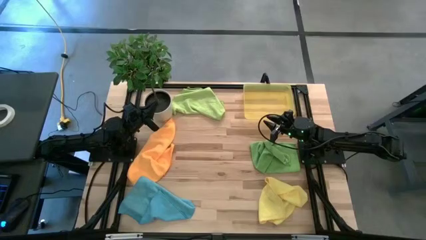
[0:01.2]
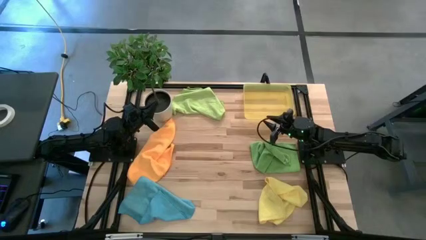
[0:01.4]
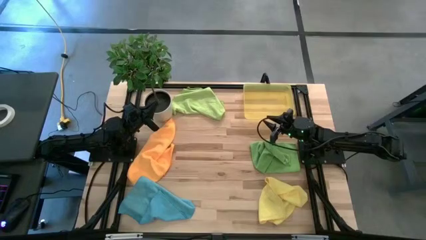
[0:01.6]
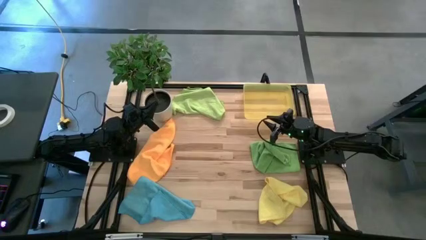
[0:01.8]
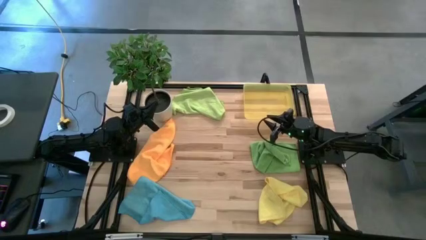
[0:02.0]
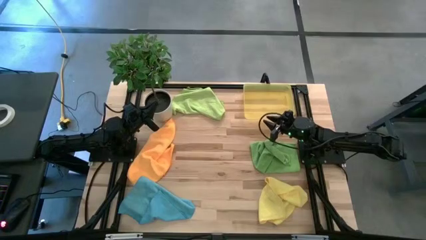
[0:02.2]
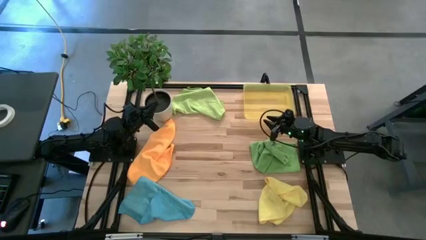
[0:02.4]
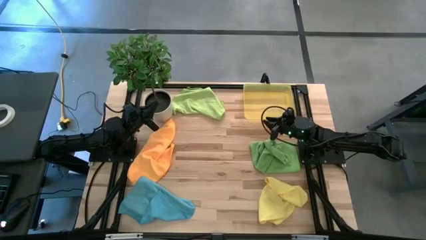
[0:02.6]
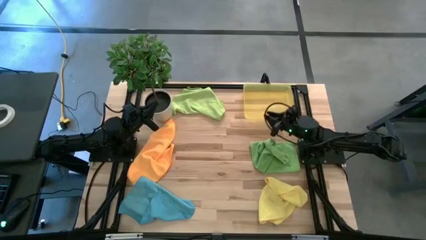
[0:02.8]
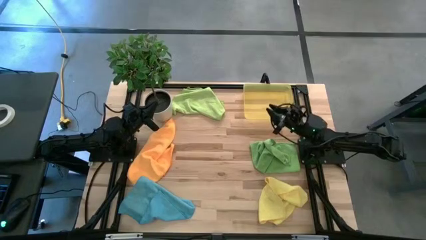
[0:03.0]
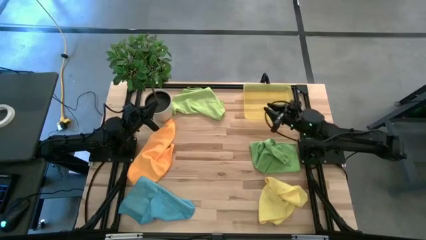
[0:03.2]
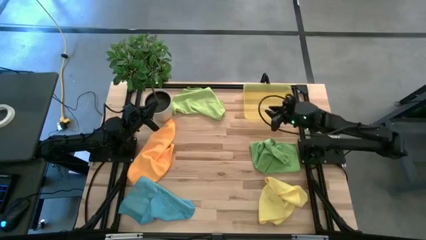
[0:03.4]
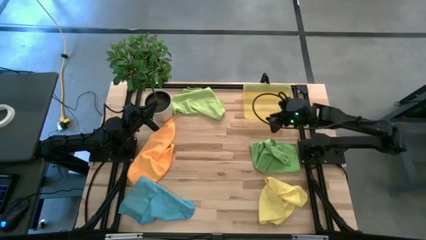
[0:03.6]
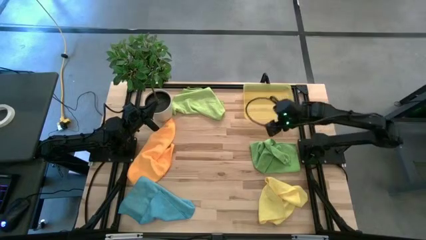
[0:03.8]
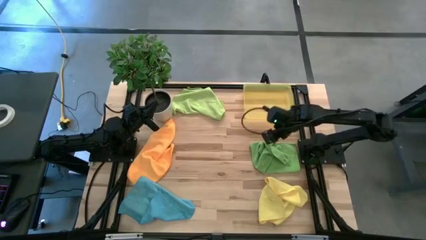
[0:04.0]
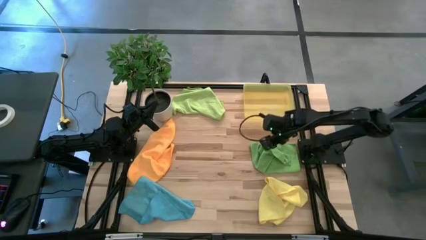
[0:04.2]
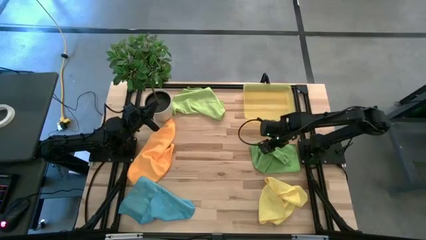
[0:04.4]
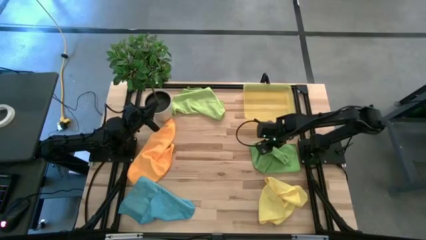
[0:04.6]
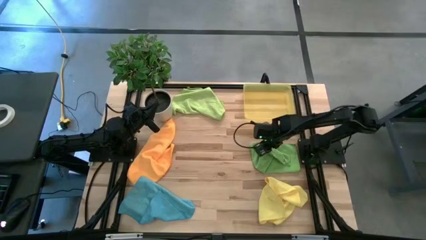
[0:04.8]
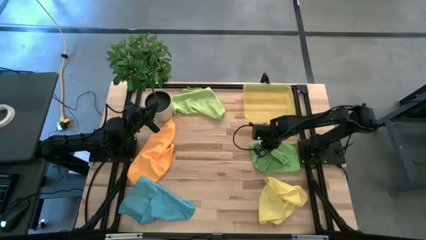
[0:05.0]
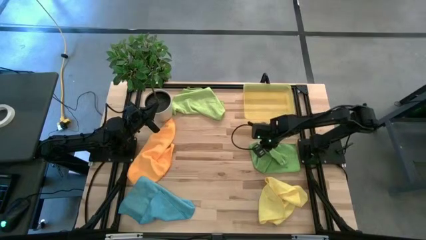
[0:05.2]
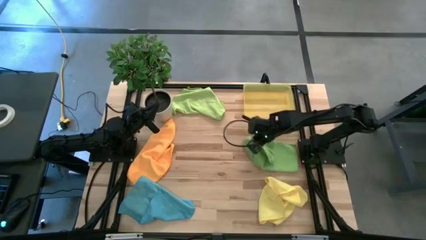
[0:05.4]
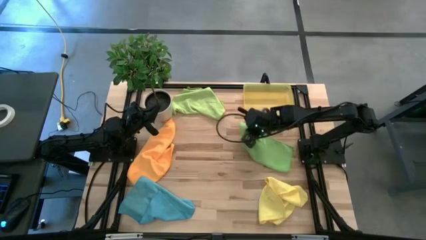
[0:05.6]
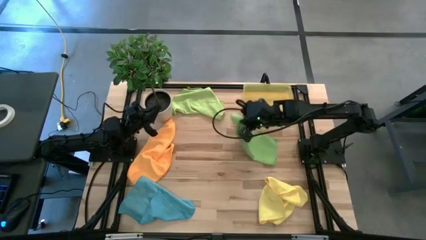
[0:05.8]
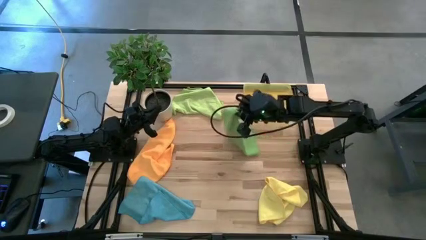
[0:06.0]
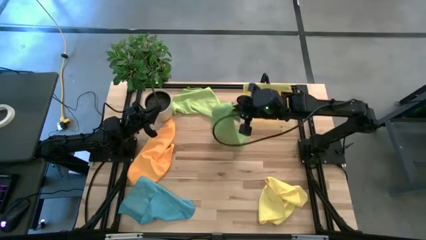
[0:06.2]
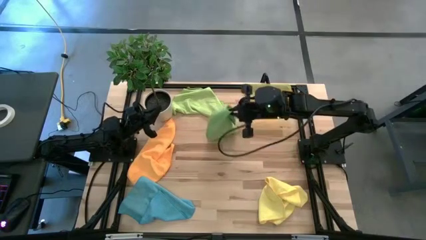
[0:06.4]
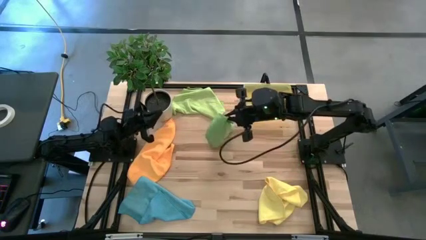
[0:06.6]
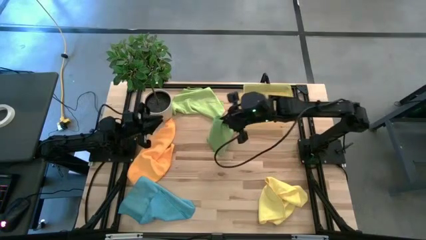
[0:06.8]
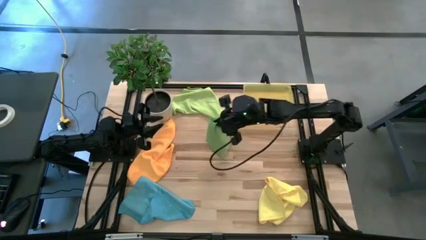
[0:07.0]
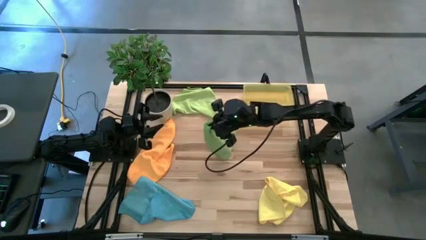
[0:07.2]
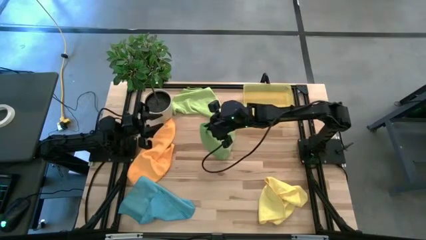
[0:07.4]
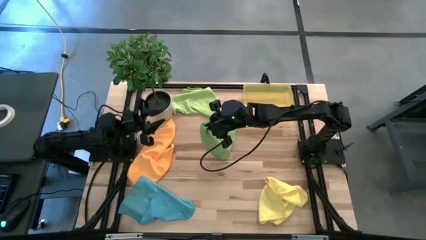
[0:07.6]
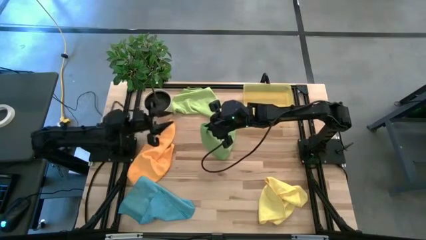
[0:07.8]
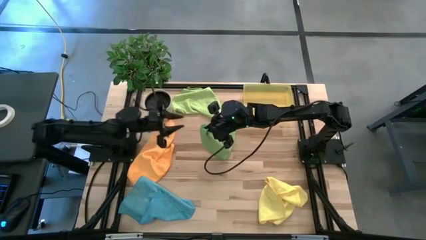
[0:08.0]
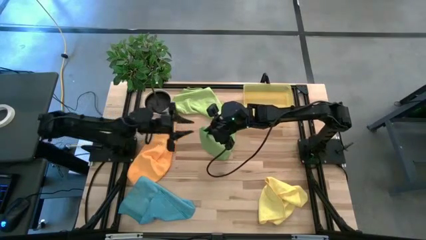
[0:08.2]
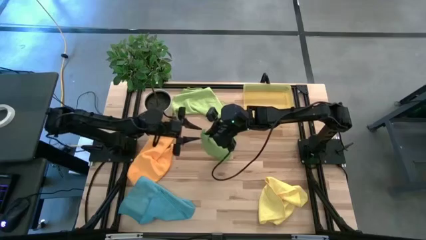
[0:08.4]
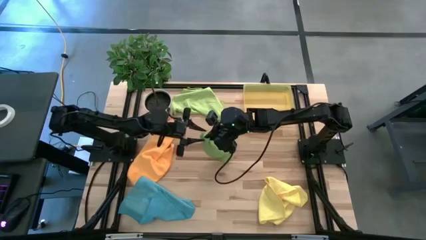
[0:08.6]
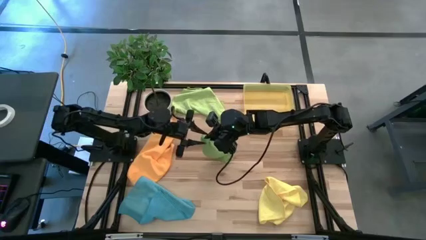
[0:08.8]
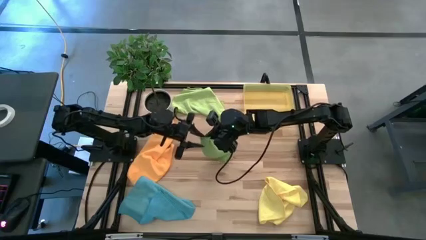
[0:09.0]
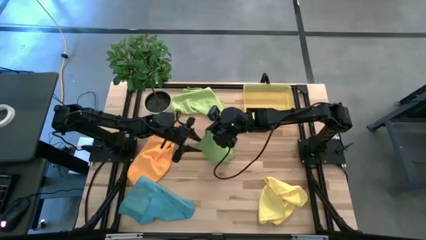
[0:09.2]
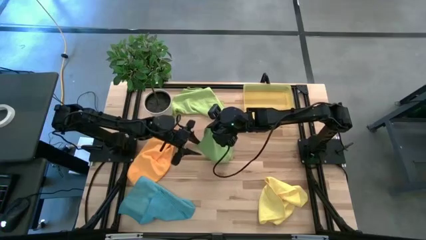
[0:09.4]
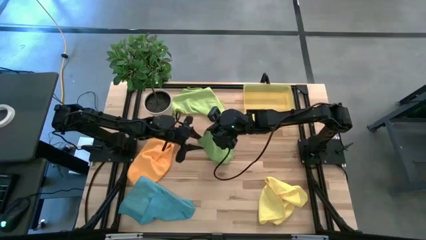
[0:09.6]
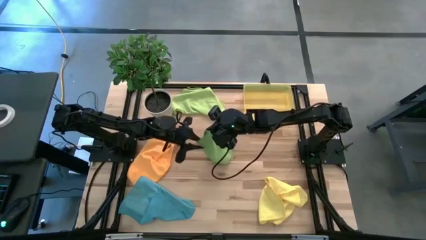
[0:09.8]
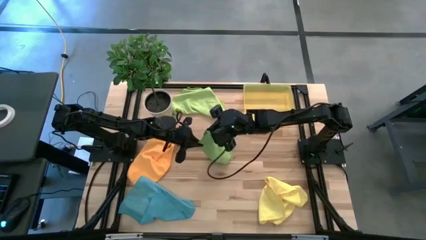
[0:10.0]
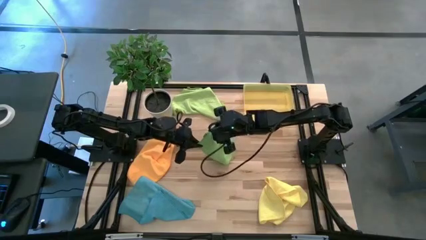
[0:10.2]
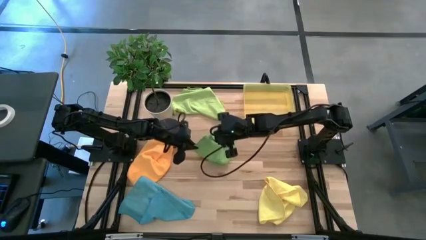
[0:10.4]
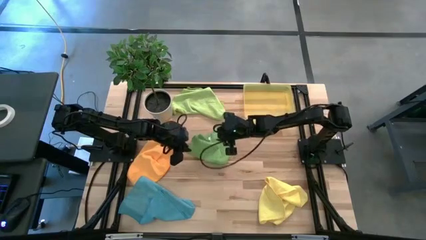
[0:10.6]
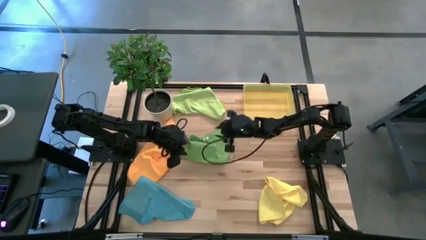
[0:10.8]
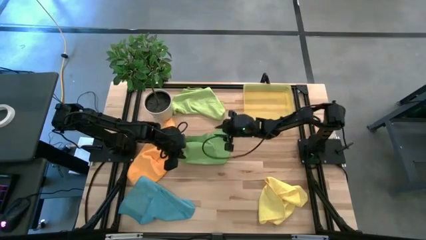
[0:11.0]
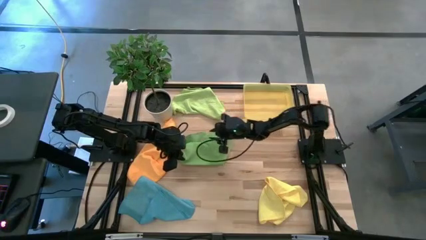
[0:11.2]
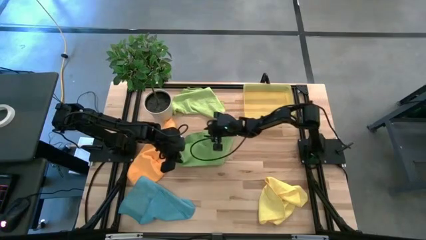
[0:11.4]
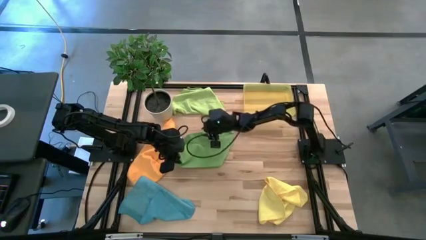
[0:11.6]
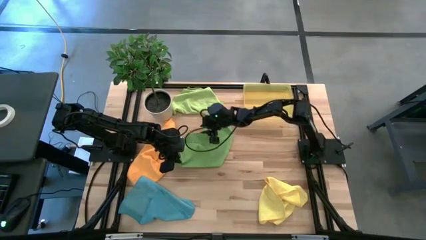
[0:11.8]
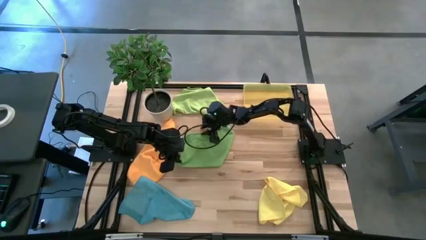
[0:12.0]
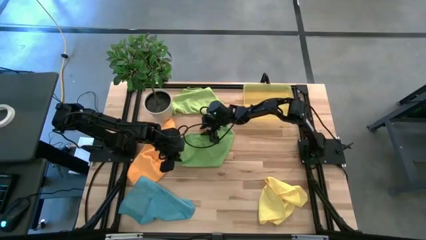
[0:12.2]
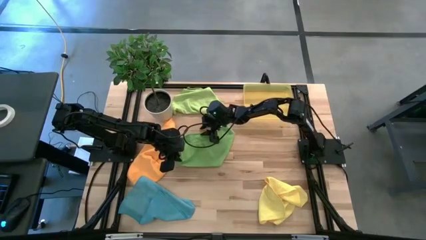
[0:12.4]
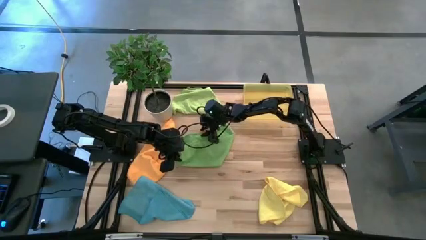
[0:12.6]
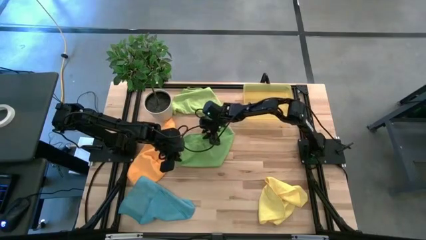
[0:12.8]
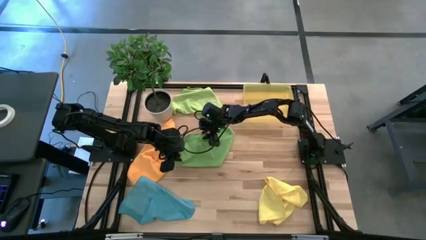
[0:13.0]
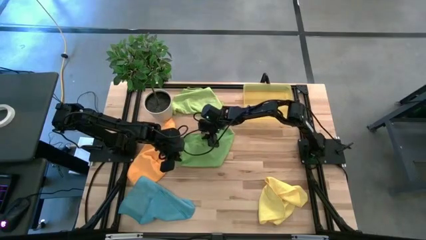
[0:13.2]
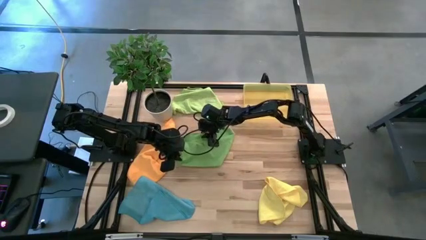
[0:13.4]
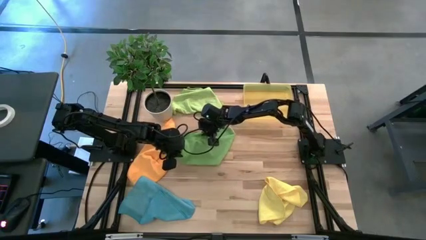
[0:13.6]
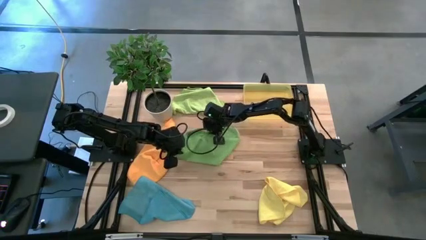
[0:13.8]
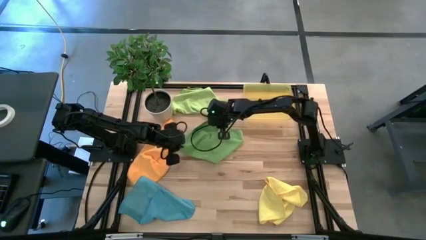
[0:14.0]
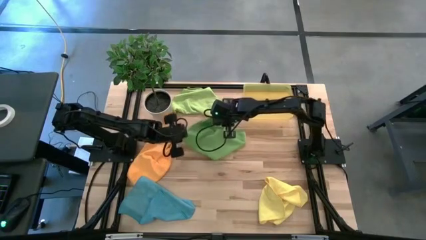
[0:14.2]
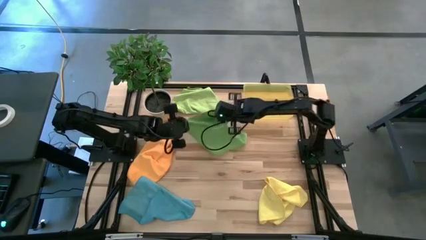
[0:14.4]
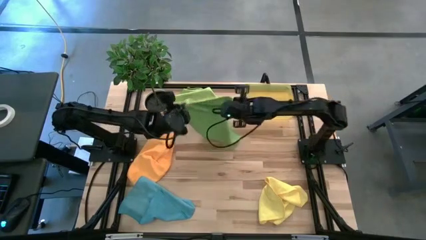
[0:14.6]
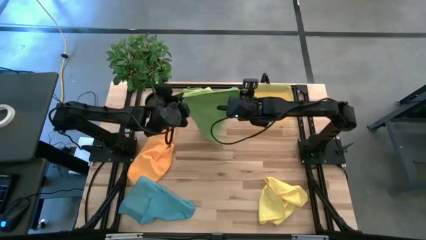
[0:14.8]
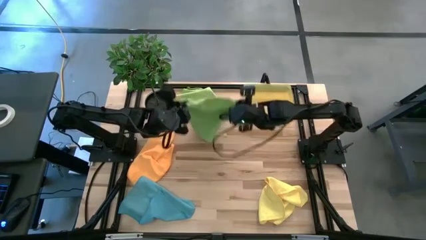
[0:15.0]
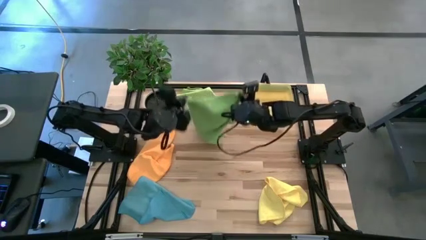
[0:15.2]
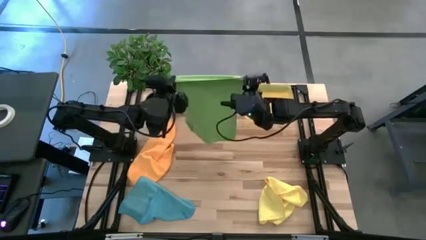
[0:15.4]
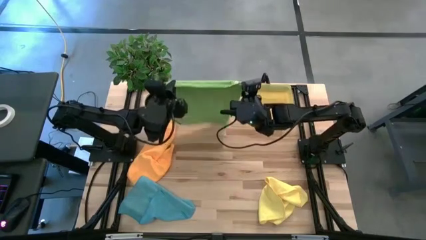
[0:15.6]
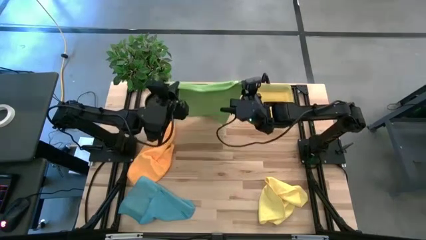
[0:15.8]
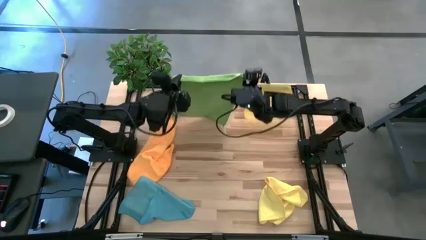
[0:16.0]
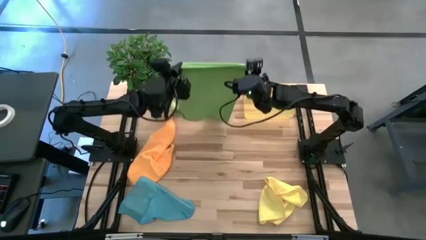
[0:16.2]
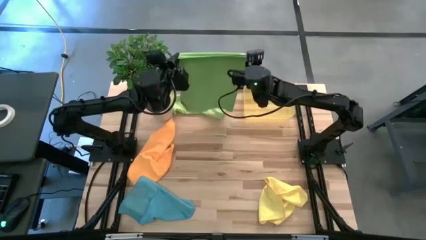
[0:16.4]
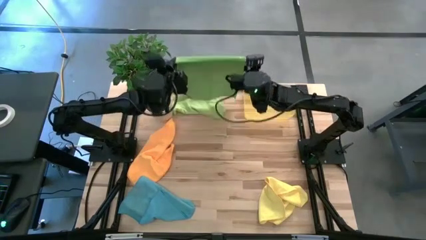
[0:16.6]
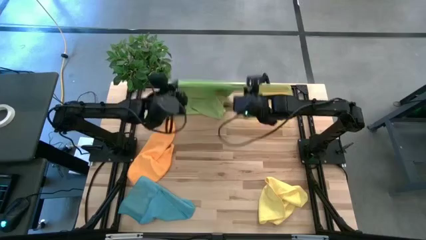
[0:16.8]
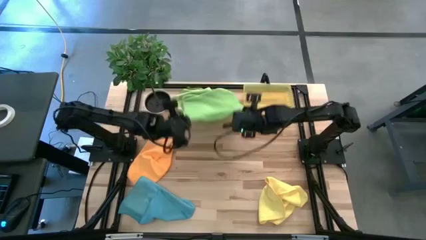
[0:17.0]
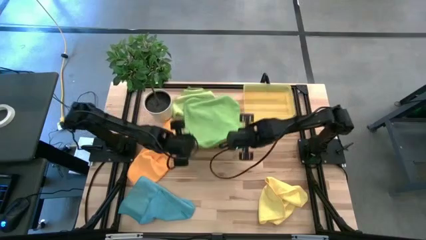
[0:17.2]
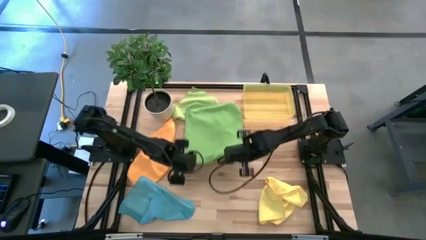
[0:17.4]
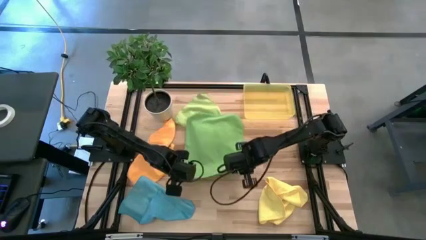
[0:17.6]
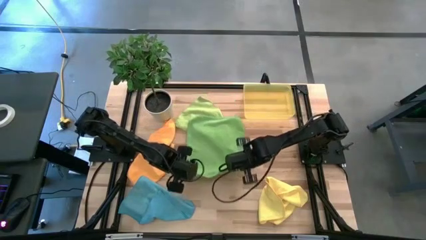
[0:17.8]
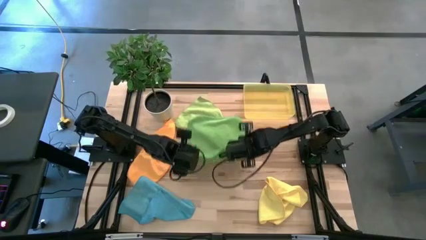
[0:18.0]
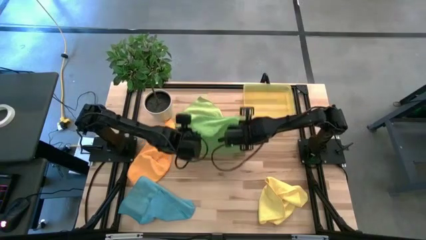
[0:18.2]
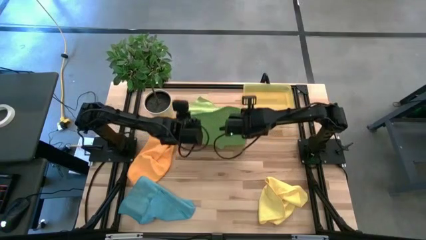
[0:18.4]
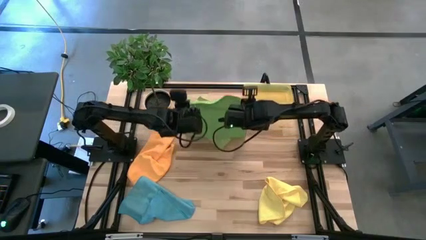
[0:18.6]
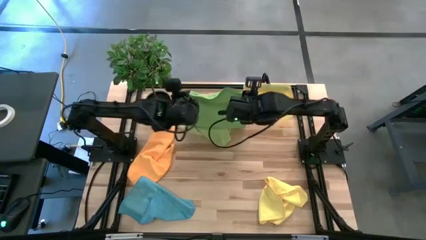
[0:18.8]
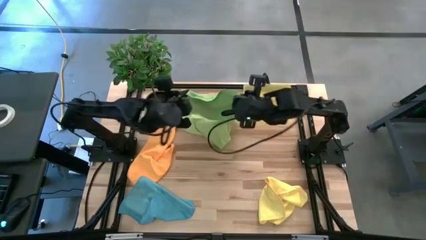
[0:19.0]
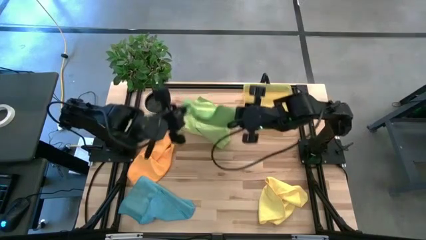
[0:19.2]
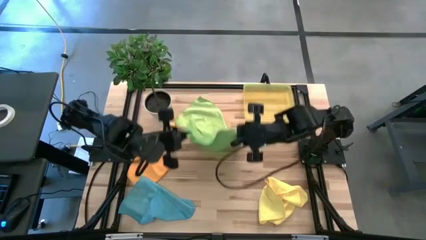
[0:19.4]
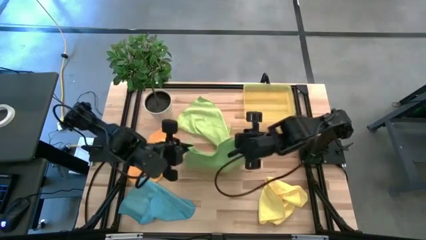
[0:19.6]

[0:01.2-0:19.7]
Task: Fold microfiber towels
Fold the green microfiber towel
